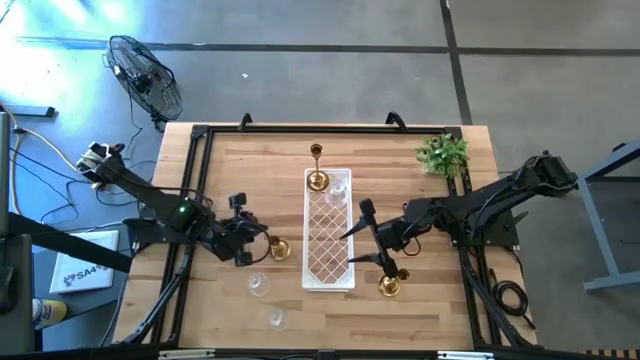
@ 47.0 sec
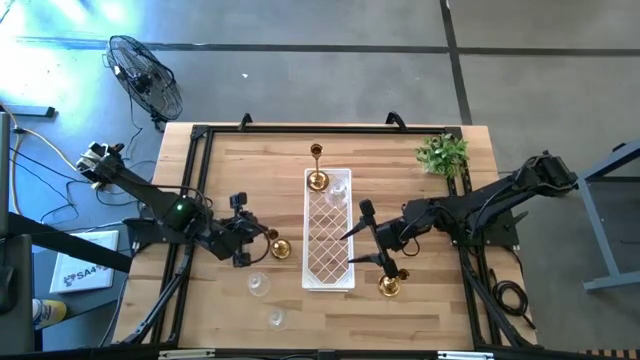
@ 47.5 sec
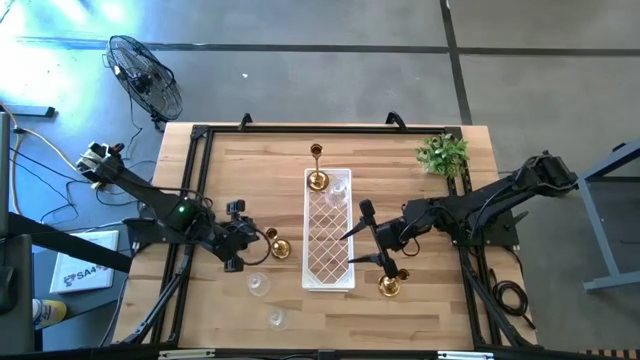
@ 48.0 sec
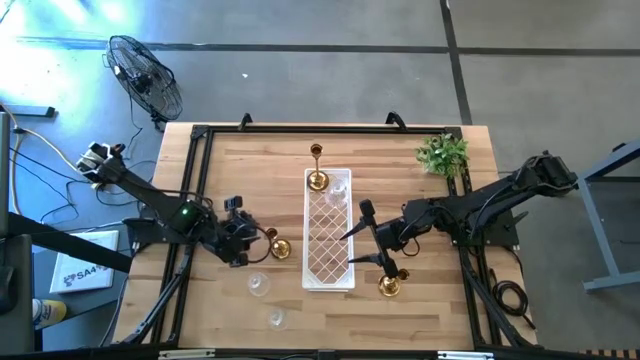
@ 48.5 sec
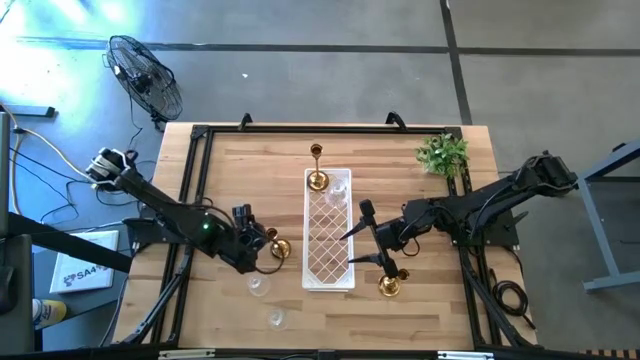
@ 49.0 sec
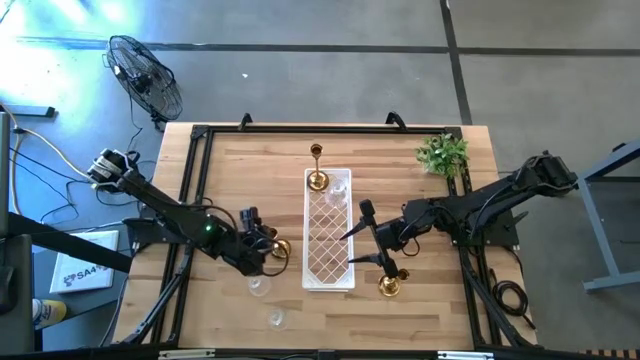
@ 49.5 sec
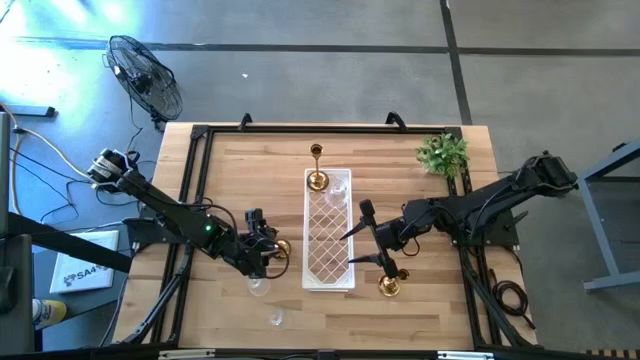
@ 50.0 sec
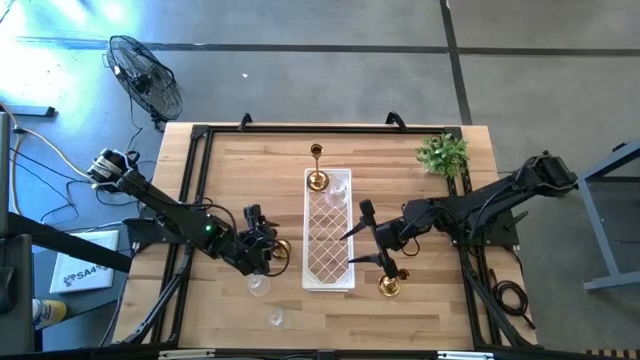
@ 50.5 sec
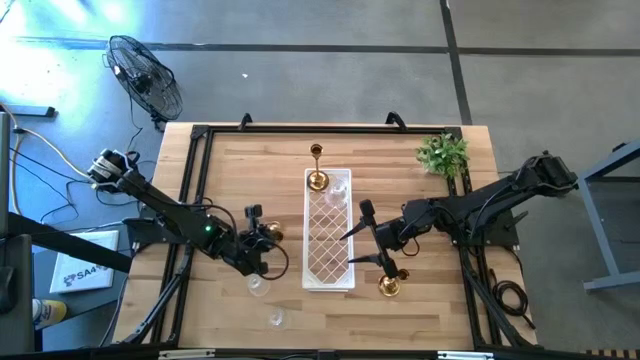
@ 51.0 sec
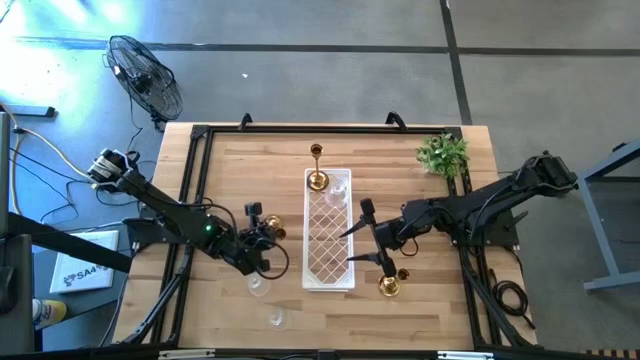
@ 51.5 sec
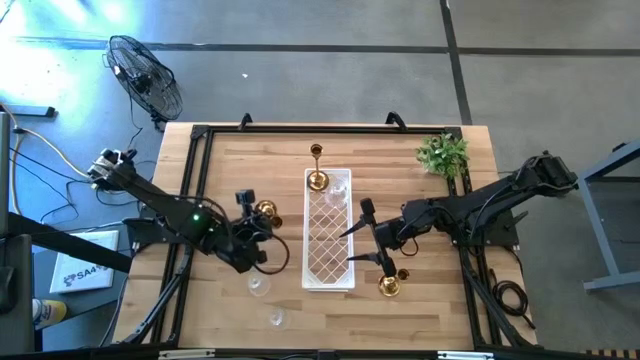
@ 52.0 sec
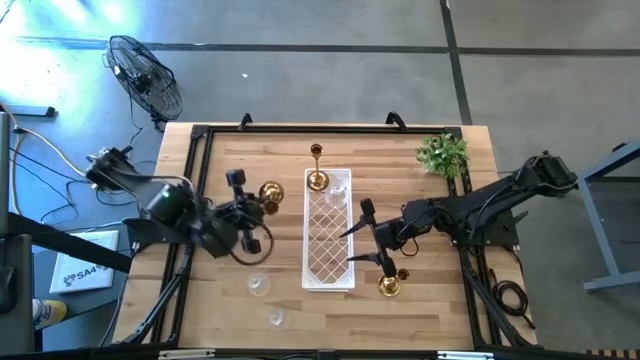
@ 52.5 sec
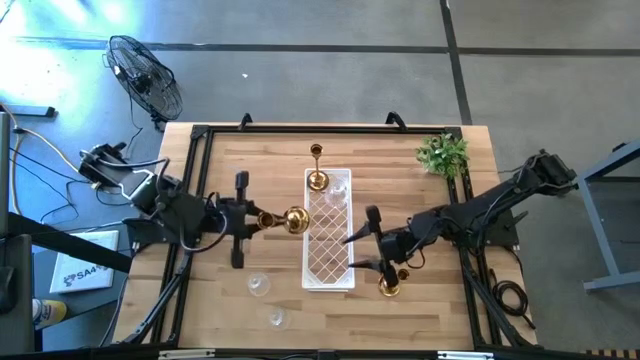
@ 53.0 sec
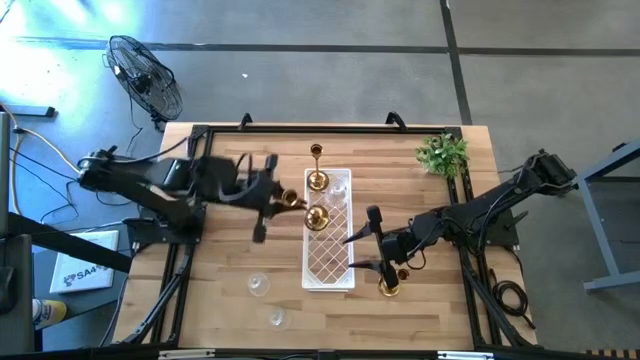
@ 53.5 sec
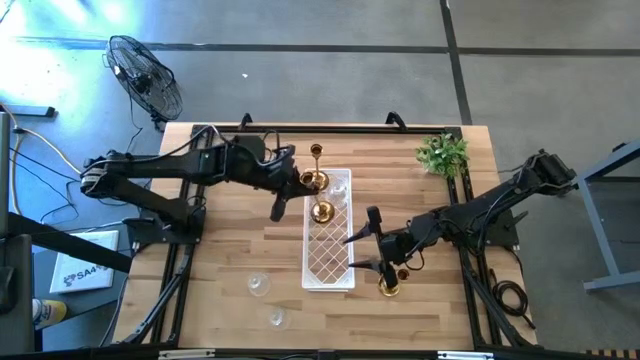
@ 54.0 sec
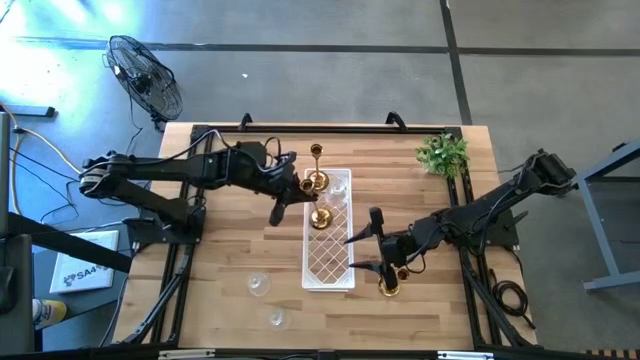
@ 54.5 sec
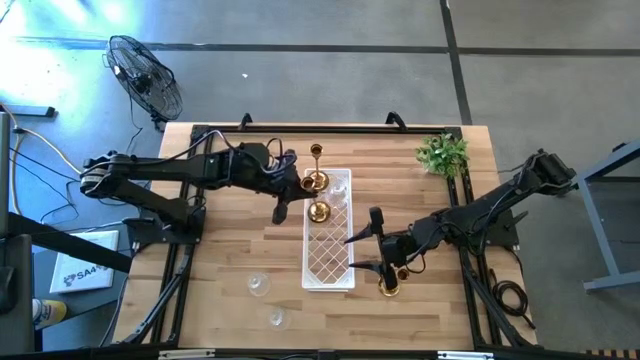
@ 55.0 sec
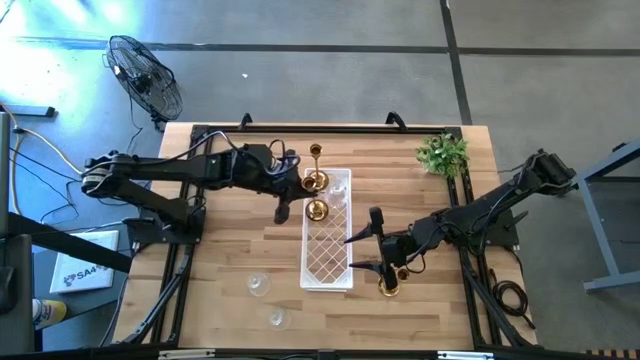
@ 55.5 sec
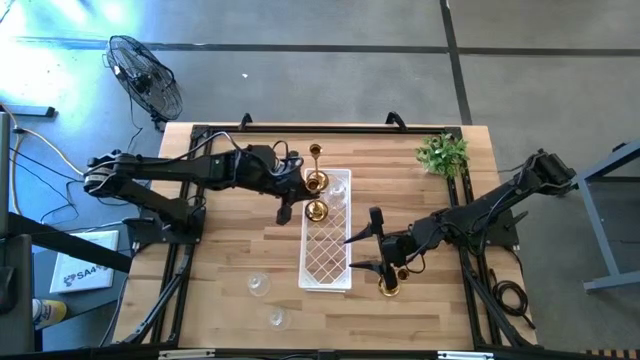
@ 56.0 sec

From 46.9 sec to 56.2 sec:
Task: Pick & Place candle stick holders
Put the left gold candle holder on the shelf aligned with the other gold candle holder

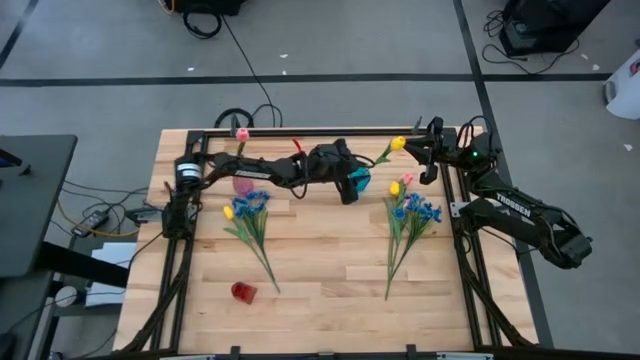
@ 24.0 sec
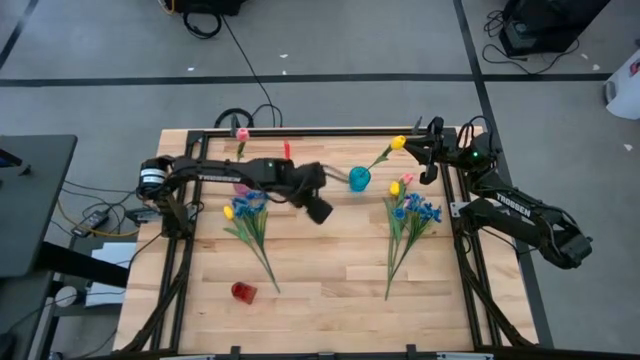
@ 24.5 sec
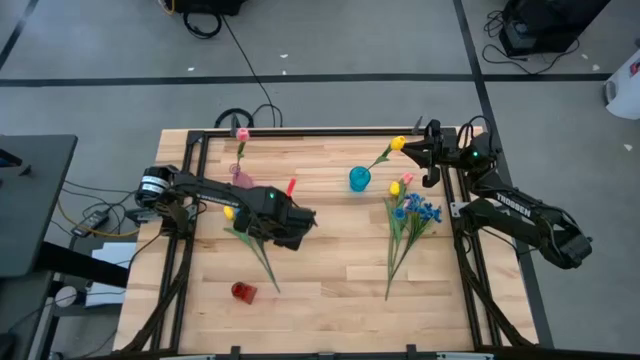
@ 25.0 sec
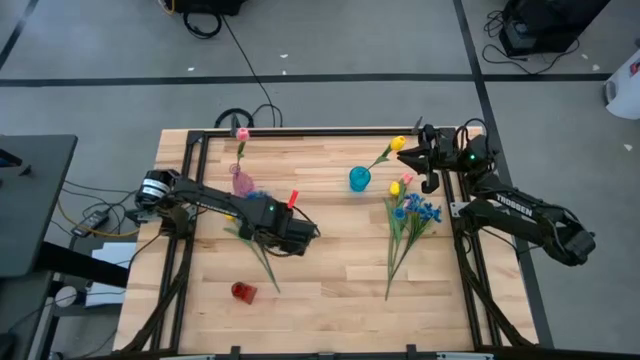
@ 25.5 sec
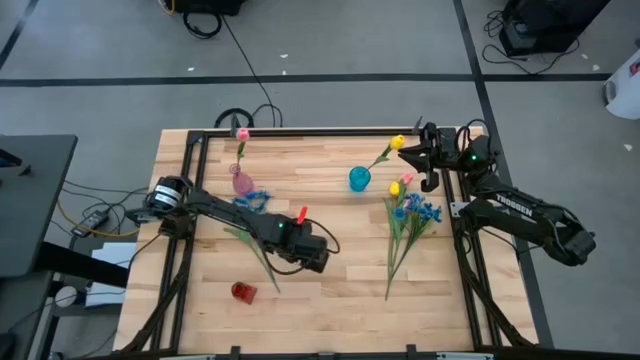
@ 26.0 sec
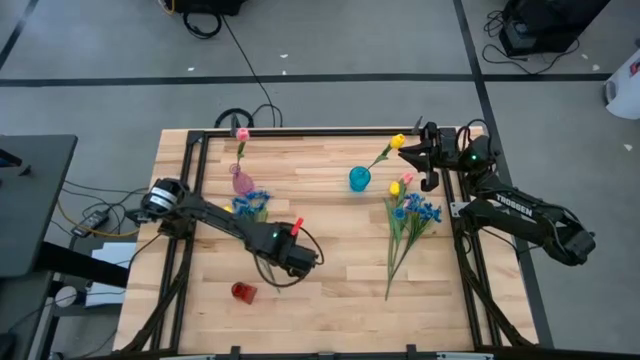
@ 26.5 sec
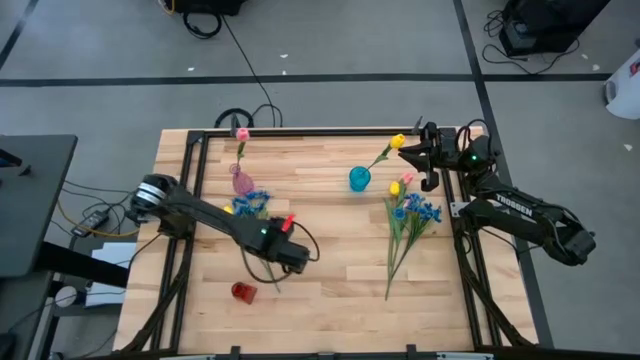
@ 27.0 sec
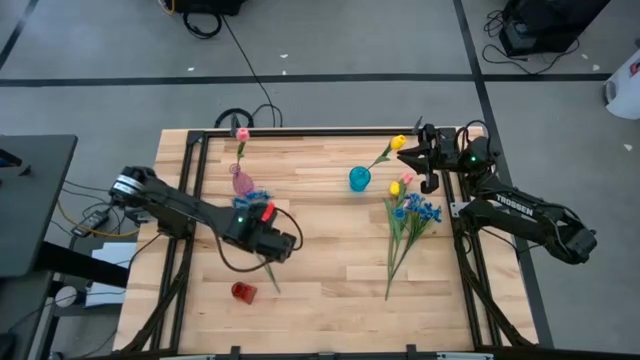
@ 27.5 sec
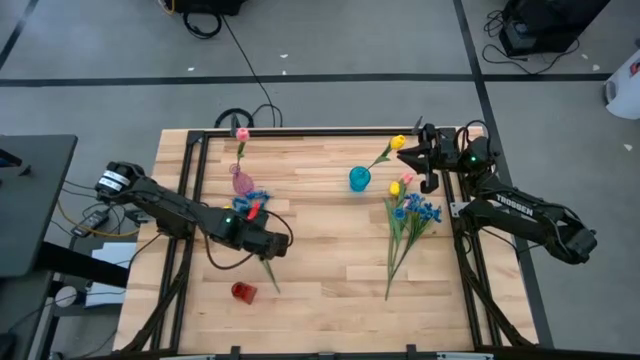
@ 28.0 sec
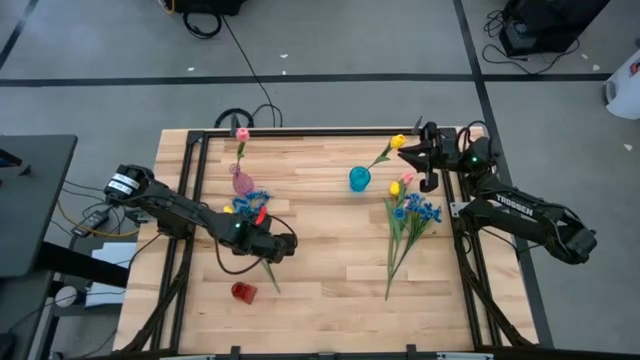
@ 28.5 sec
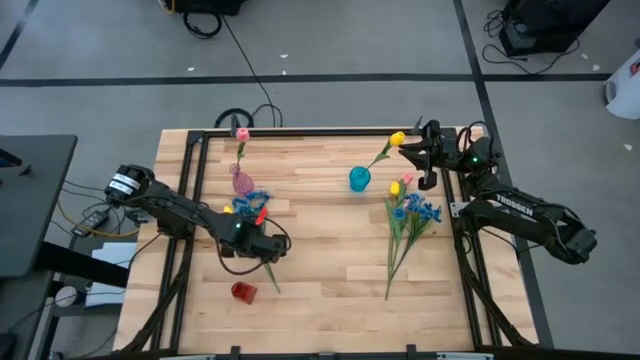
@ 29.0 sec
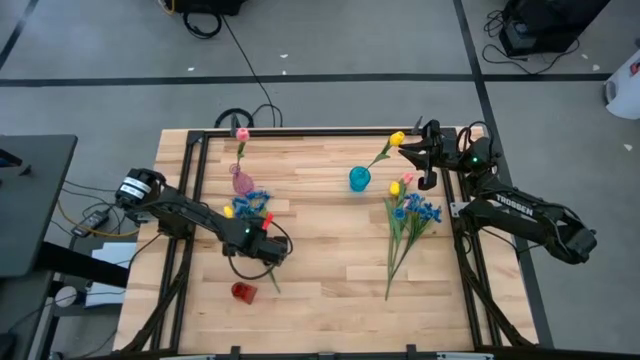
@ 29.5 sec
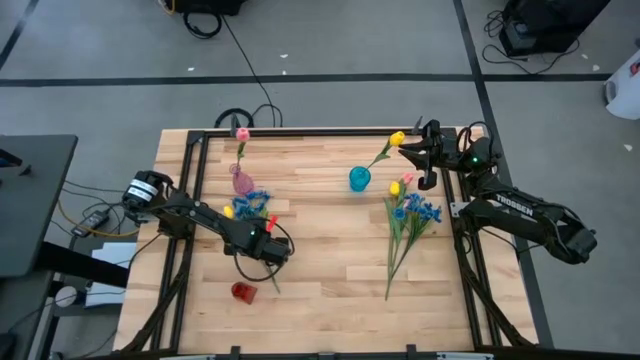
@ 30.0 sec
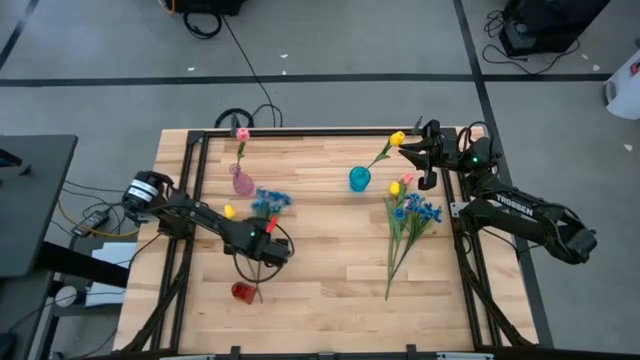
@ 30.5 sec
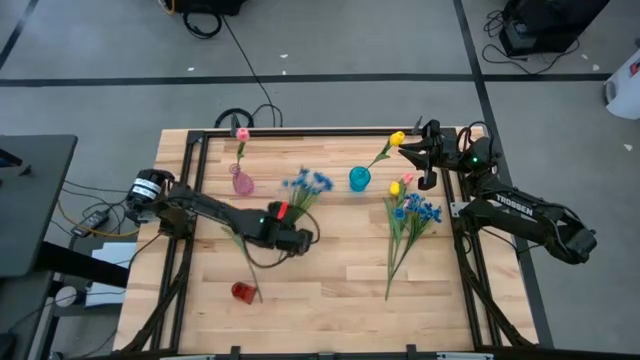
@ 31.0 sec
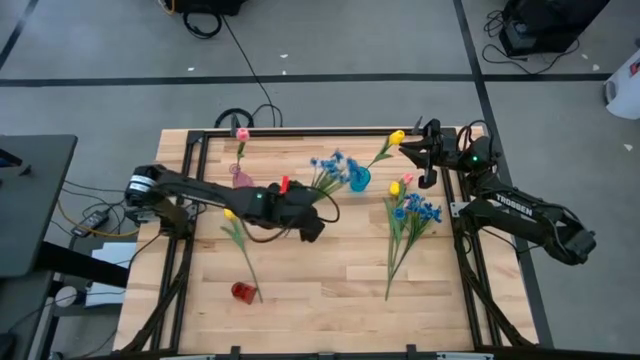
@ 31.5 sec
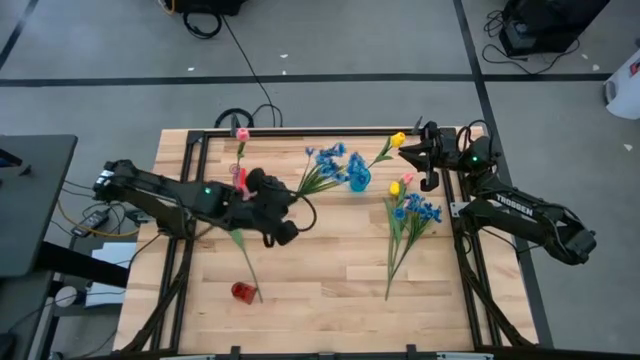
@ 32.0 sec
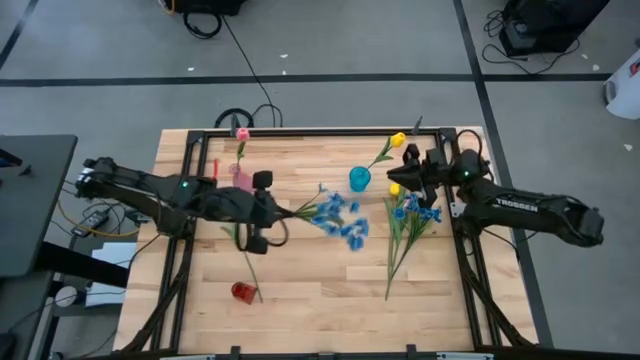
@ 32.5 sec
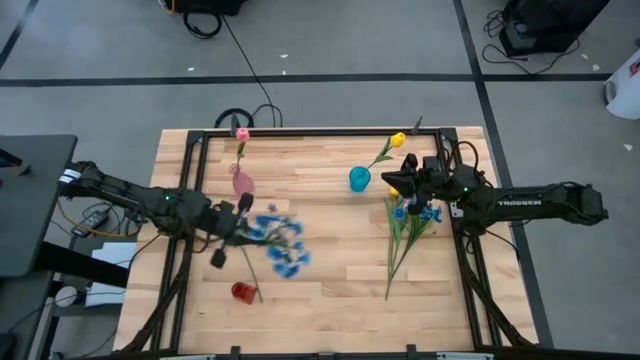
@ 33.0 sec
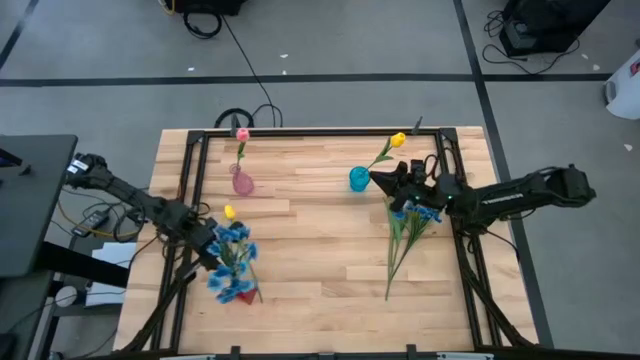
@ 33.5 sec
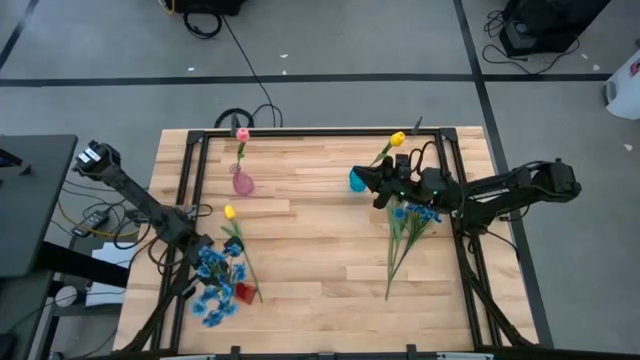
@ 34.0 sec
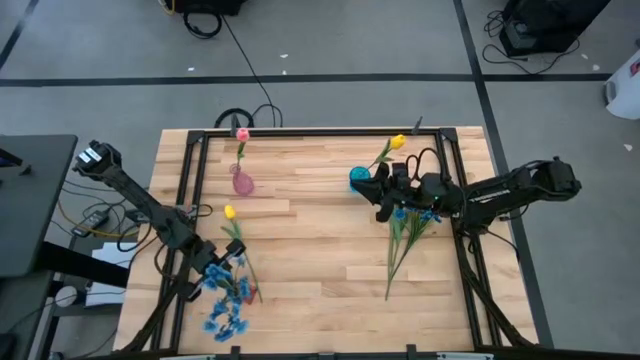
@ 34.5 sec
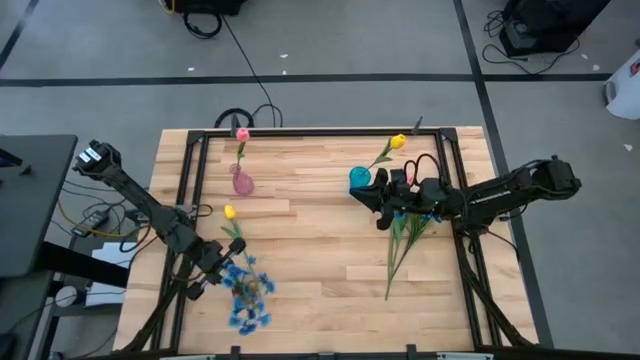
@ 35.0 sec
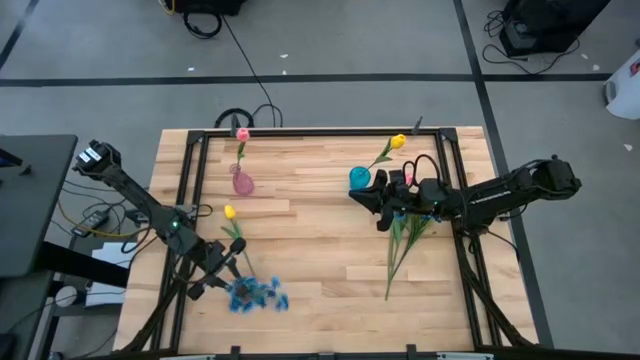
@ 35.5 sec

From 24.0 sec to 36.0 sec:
Task: Sort flowers into vase by color
Put the left blue flowers into the red vase
